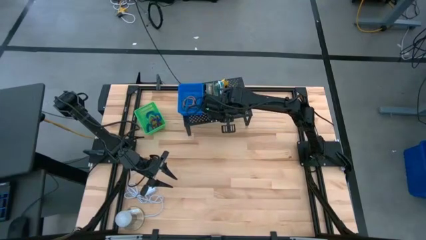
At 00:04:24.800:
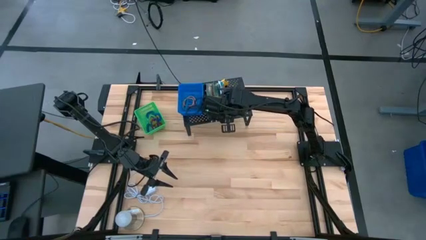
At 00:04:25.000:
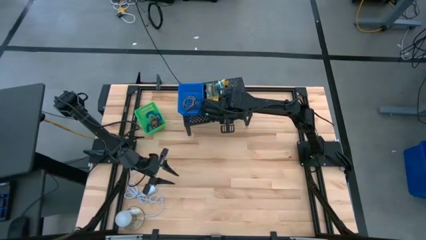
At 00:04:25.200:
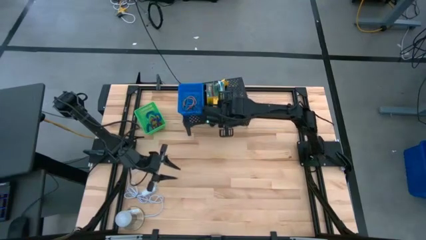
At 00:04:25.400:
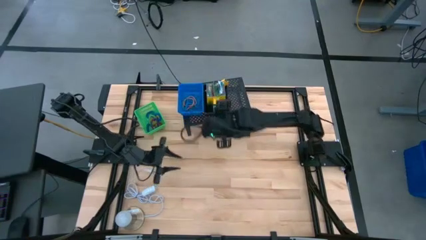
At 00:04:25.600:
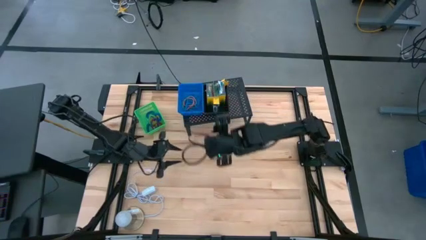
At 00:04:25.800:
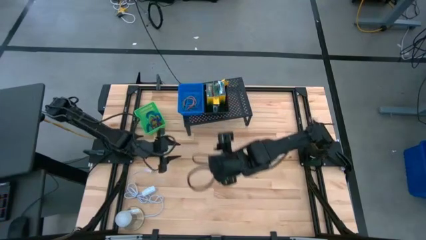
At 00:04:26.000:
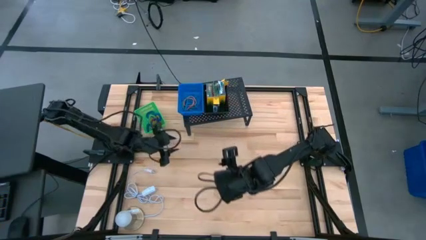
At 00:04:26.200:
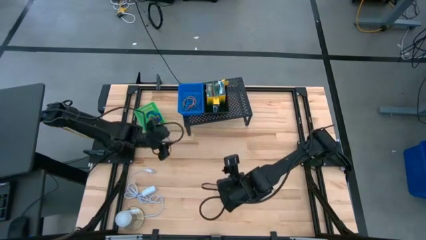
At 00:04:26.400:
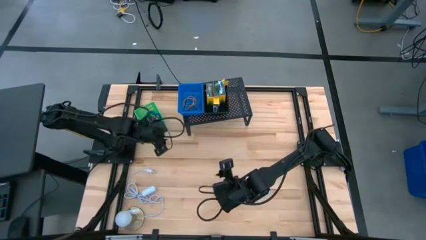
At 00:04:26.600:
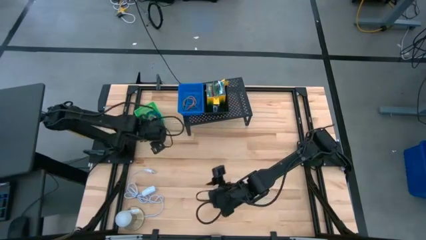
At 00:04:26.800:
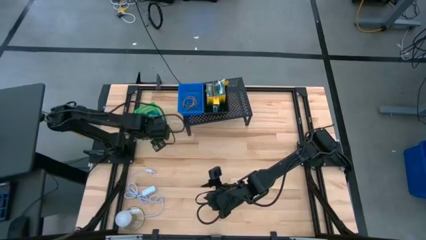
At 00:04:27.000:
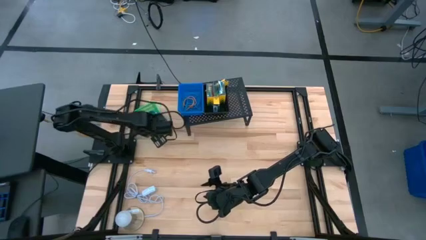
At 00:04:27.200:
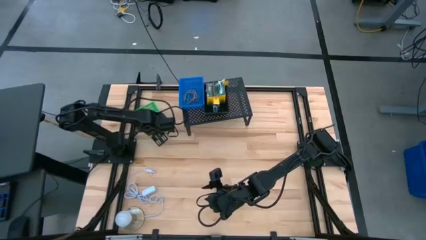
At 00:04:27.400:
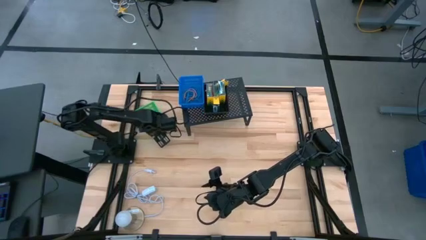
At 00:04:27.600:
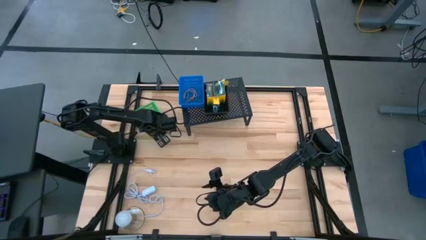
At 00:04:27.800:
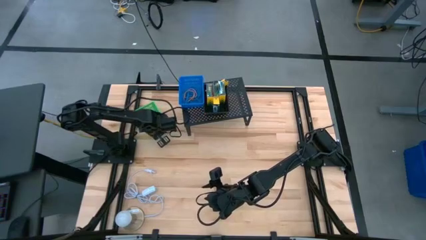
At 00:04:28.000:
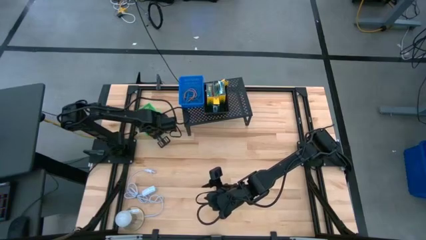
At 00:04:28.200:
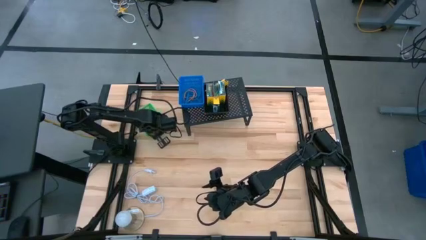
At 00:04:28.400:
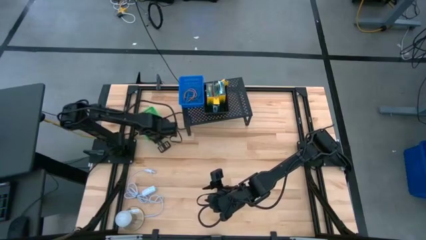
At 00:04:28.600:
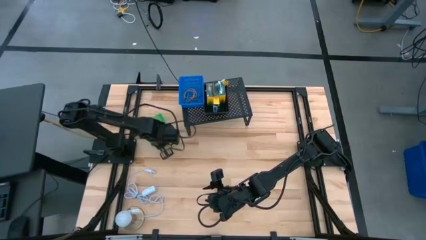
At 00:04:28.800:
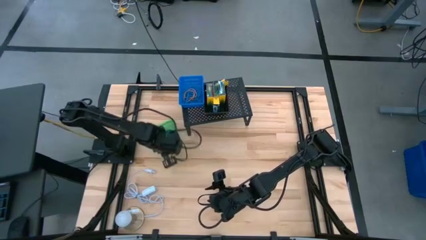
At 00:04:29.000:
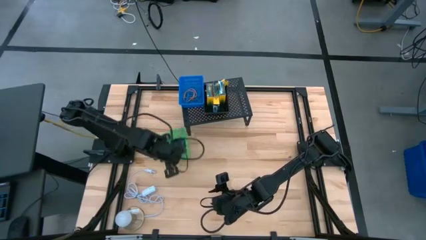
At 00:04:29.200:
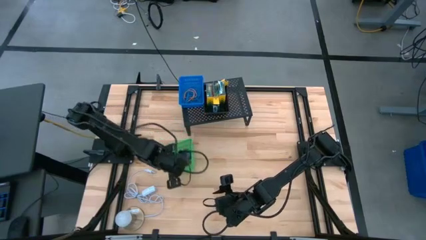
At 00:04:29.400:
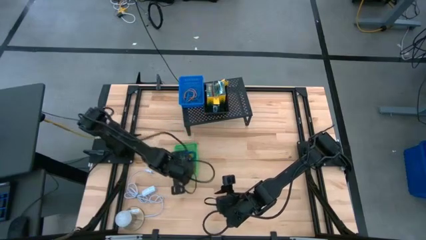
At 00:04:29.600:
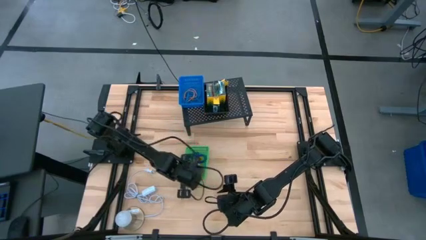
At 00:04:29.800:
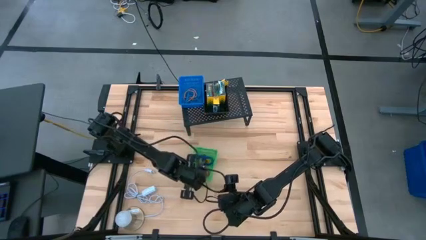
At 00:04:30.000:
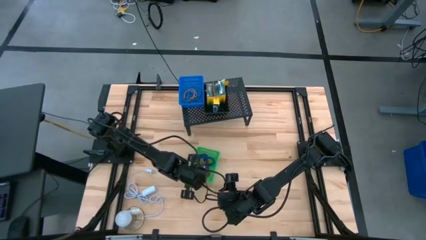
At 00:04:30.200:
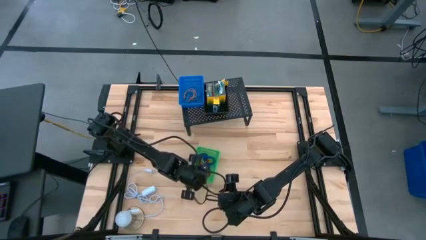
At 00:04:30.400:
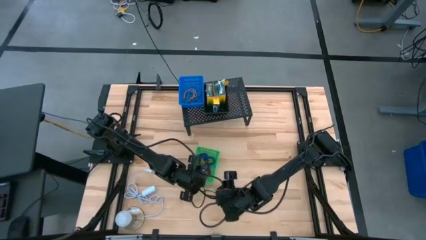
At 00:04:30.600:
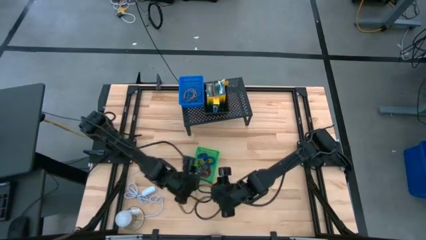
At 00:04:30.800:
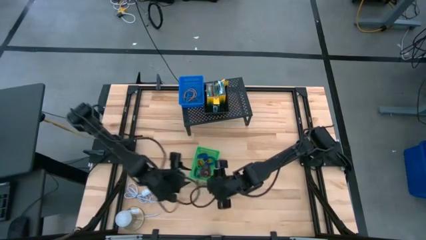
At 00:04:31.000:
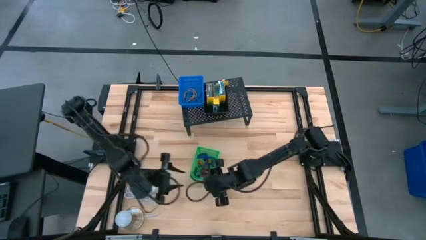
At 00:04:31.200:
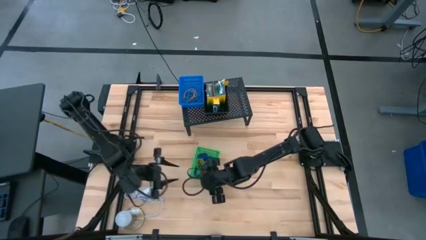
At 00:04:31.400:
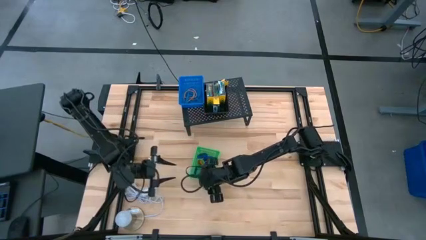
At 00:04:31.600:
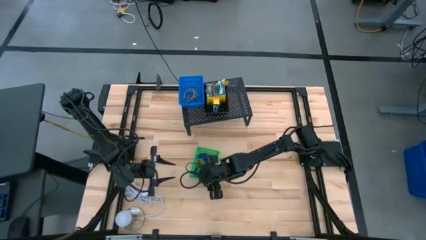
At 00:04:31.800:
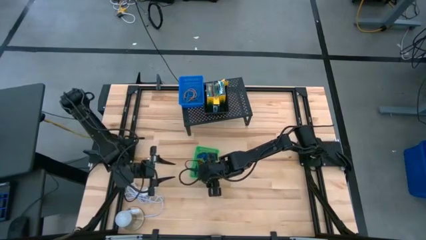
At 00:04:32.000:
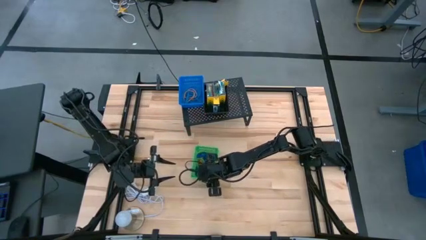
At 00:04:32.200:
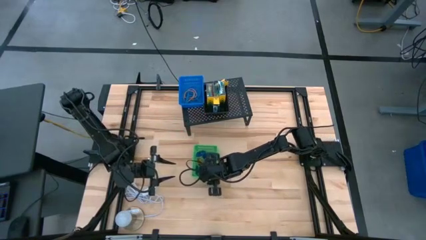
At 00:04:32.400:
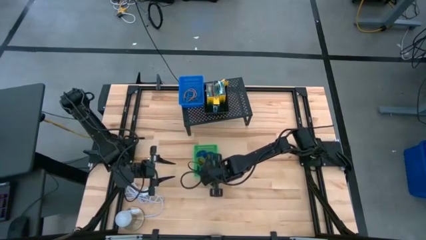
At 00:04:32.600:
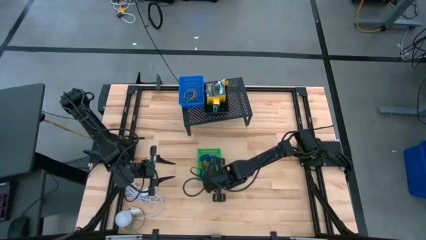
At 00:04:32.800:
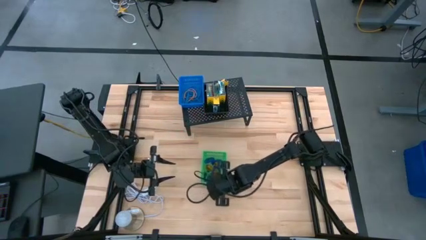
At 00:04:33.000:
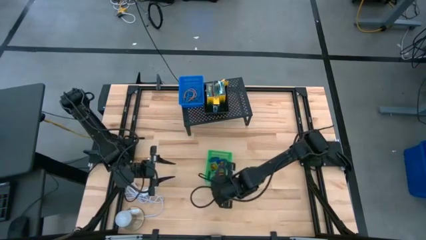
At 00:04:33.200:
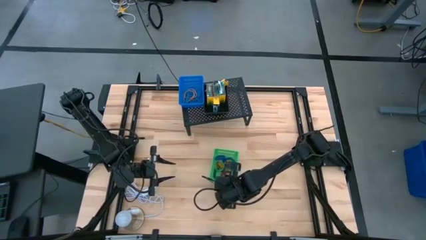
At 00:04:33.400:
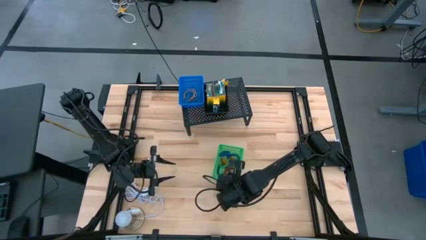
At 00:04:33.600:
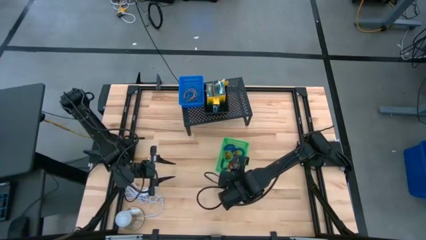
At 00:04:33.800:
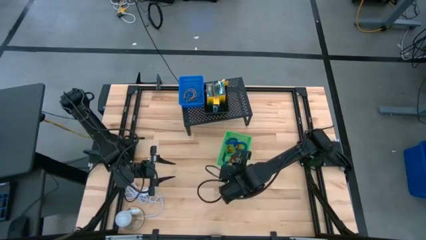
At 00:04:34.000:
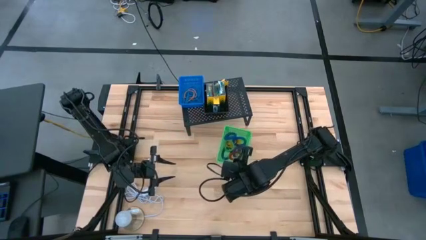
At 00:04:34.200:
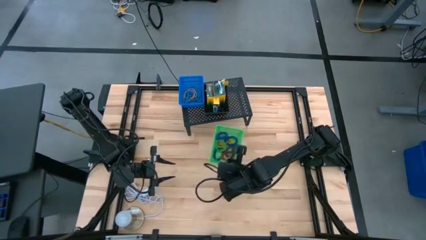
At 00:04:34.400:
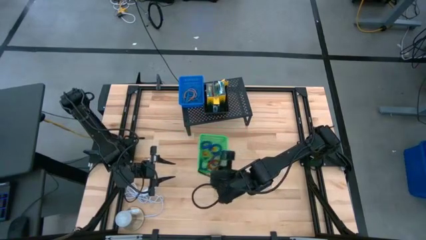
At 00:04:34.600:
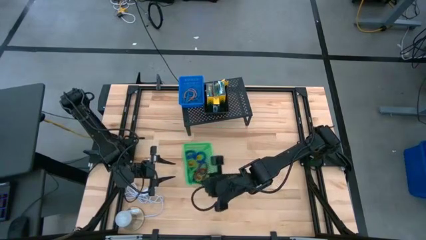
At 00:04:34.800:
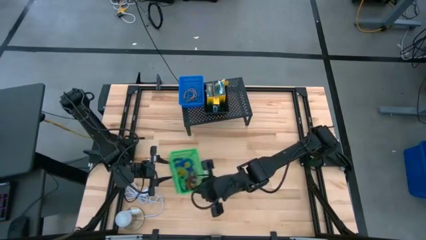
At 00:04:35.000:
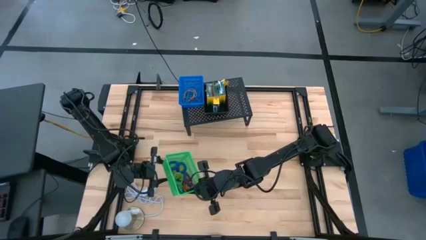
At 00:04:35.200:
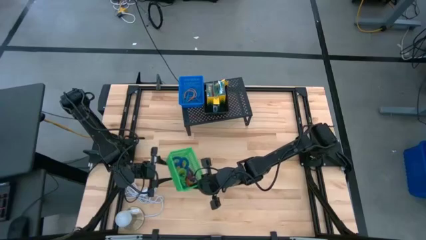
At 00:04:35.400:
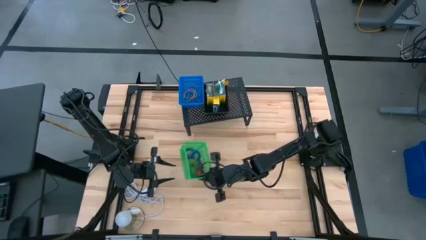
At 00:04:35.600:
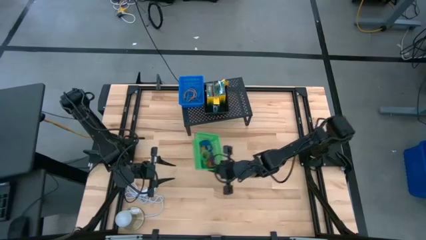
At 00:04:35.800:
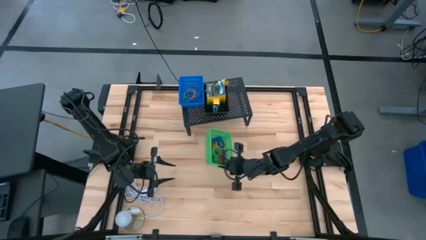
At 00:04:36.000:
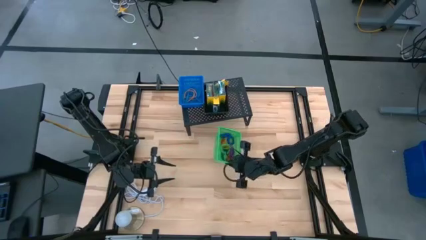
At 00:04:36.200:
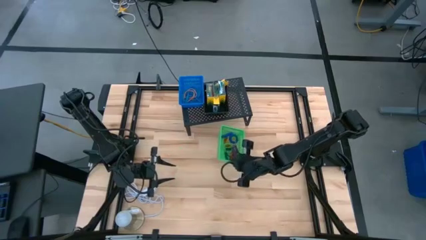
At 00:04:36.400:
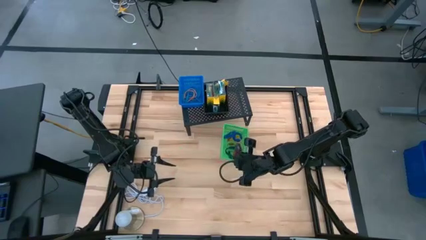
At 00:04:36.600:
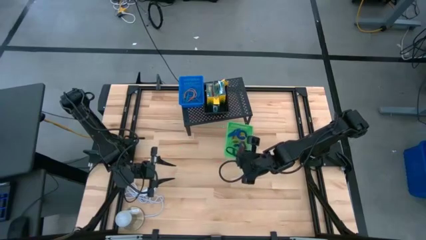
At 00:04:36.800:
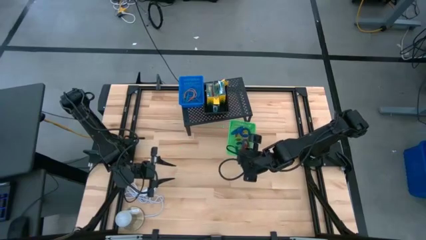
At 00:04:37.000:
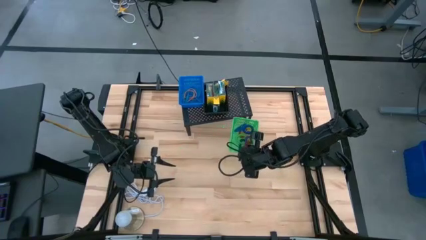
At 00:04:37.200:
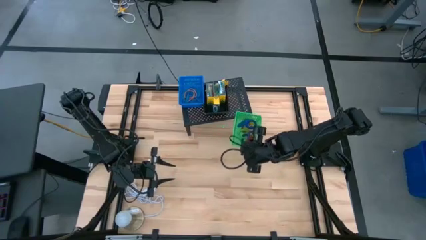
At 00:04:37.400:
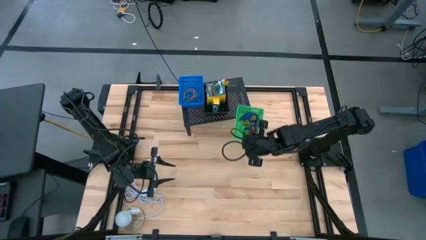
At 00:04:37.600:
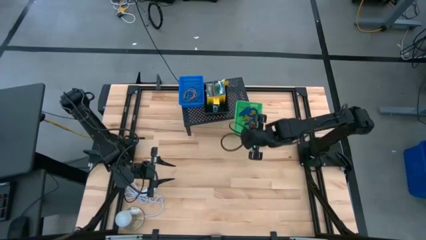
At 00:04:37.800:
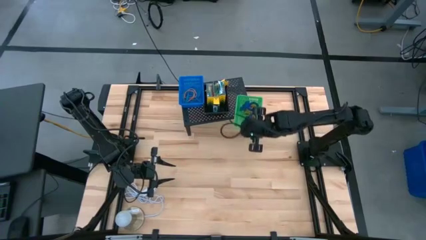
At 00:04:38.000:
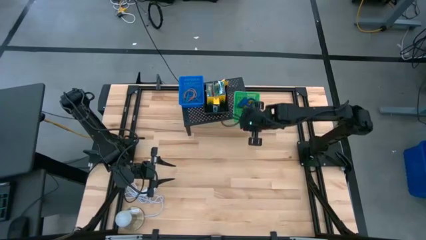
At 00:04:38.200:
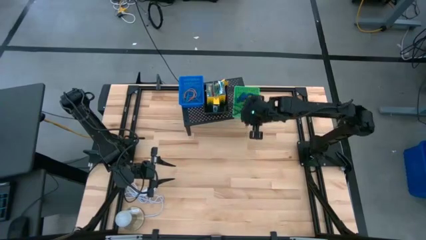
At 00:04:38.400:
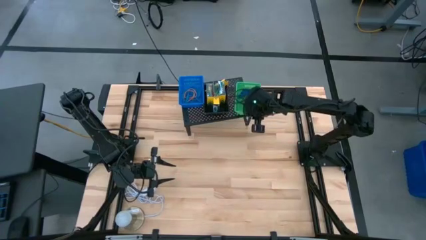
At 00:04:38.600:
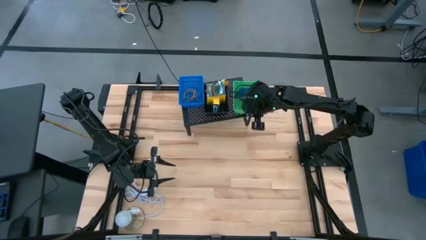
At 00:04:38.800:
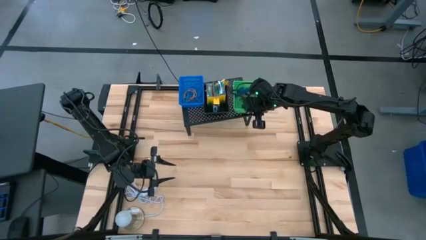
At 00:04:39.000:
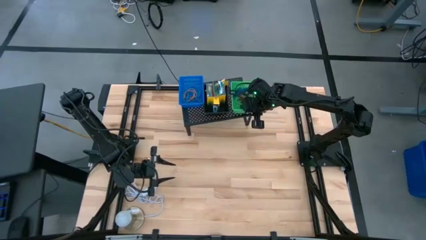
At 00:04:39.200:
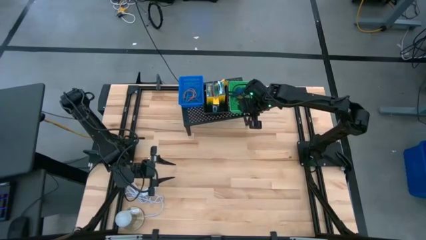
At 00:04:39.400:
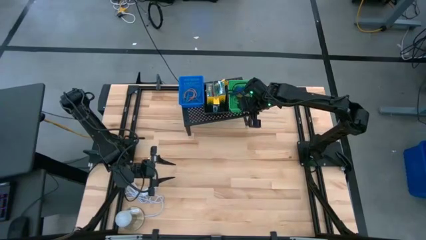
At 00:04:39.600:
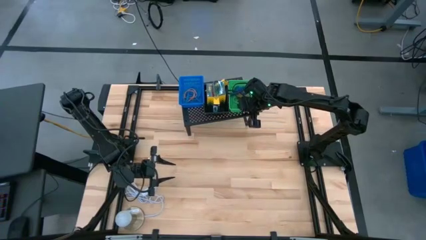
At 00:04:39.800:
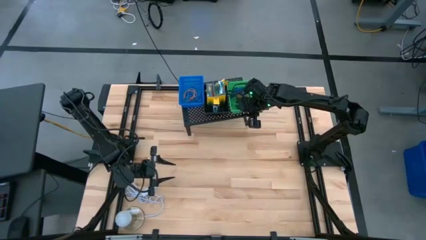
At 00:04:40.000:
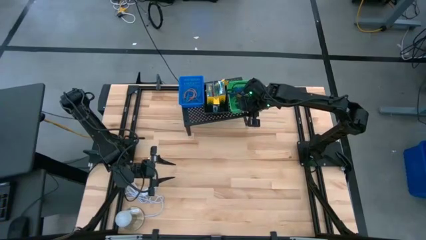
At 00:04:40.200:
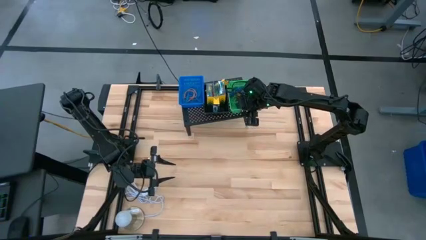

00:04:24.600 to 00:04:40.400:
Task: Pick & Place Office Desk Supplies
Put the green bin on the shelf
